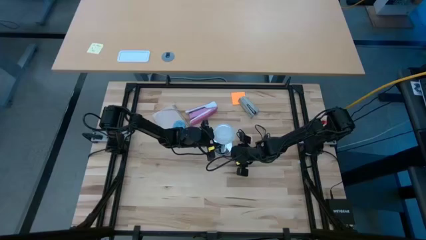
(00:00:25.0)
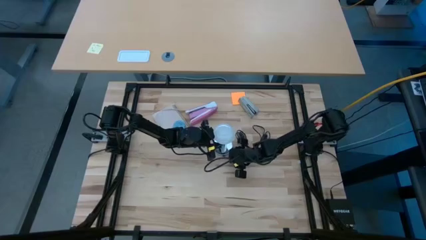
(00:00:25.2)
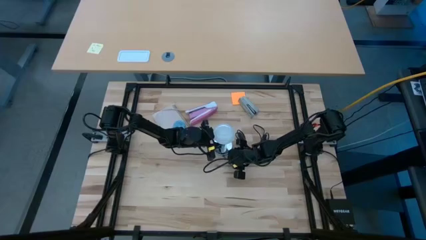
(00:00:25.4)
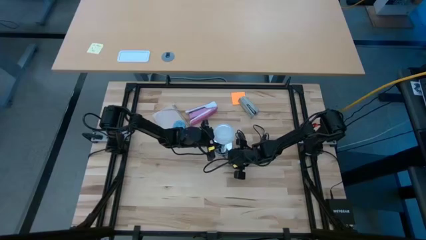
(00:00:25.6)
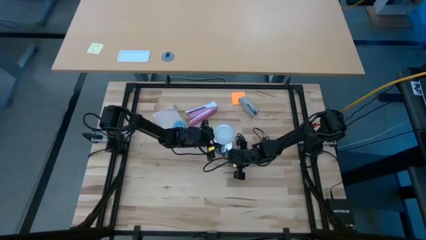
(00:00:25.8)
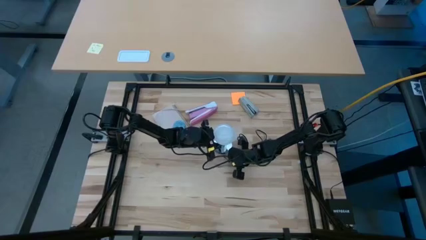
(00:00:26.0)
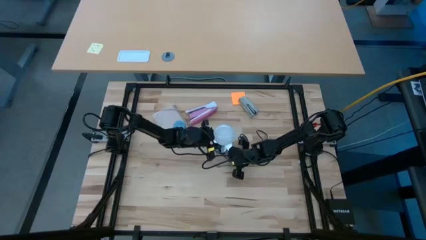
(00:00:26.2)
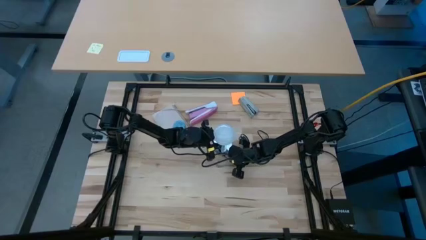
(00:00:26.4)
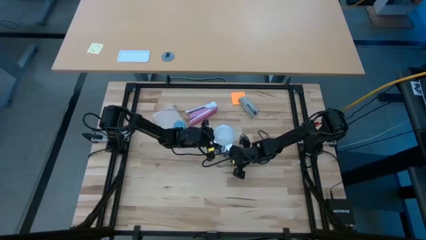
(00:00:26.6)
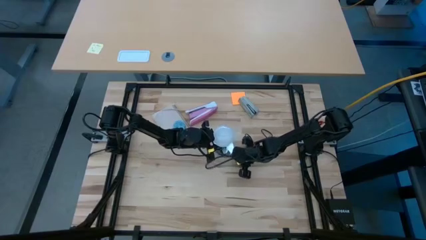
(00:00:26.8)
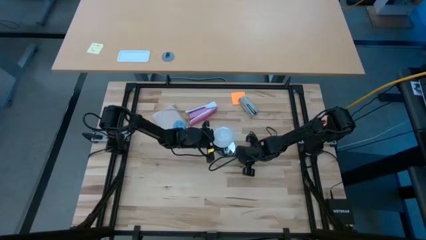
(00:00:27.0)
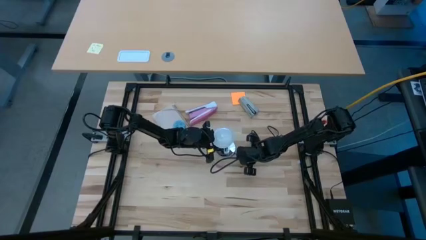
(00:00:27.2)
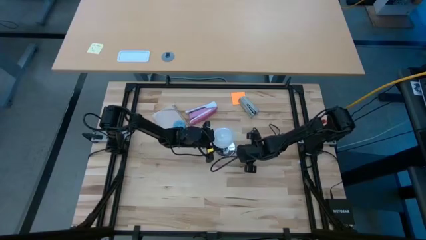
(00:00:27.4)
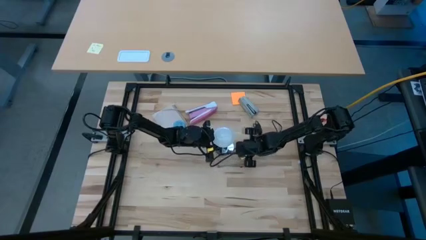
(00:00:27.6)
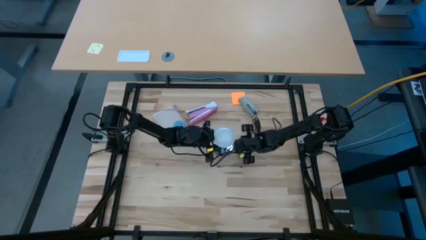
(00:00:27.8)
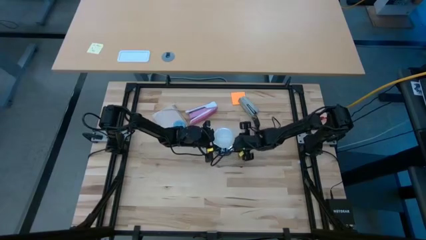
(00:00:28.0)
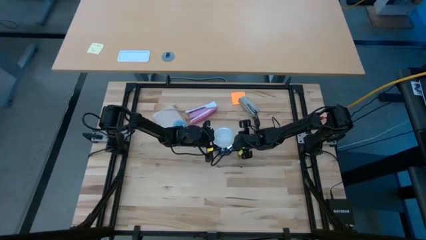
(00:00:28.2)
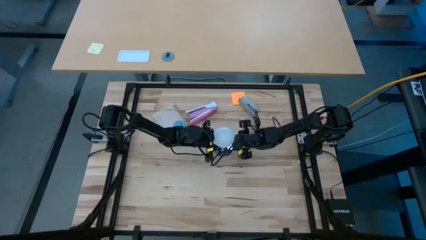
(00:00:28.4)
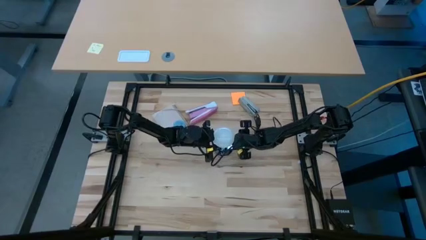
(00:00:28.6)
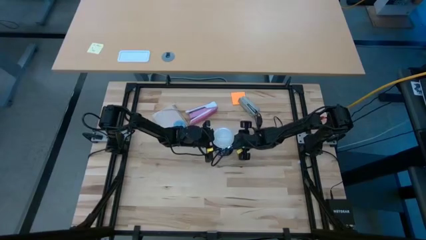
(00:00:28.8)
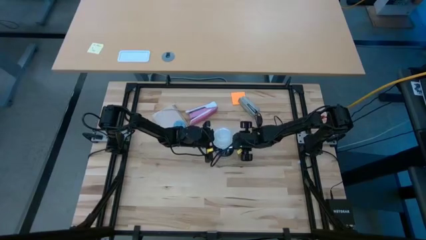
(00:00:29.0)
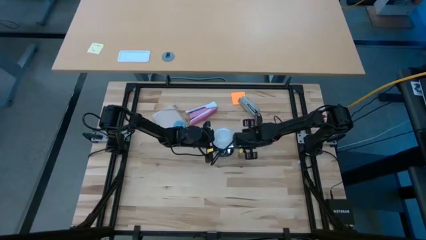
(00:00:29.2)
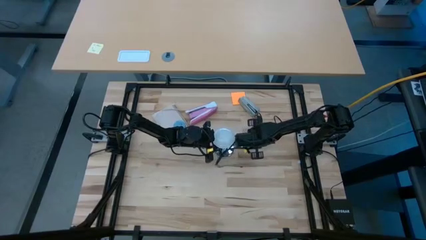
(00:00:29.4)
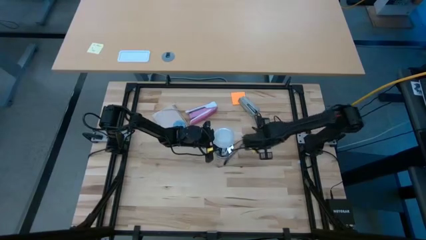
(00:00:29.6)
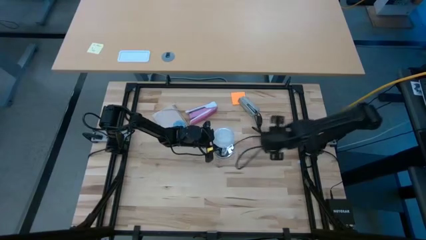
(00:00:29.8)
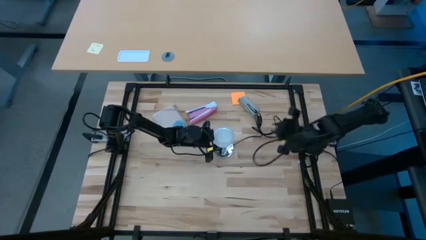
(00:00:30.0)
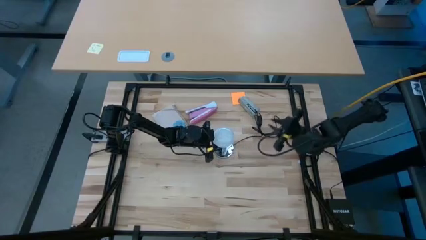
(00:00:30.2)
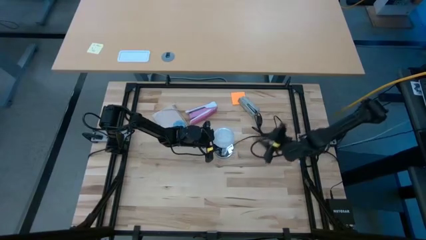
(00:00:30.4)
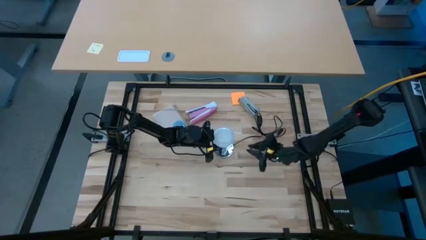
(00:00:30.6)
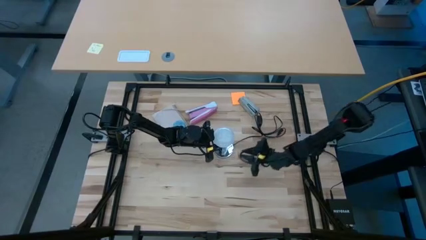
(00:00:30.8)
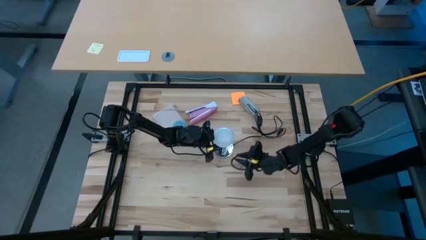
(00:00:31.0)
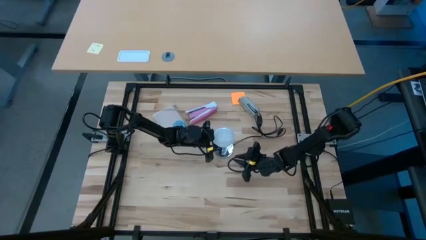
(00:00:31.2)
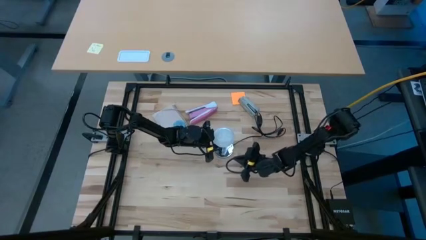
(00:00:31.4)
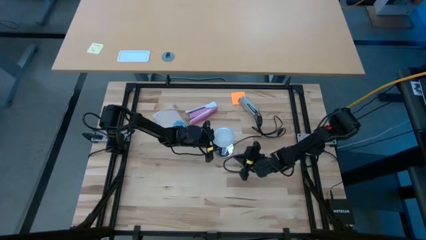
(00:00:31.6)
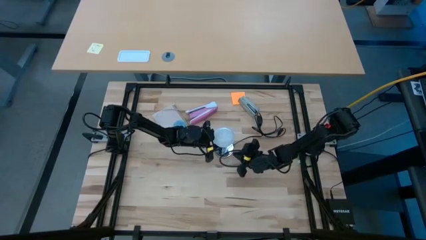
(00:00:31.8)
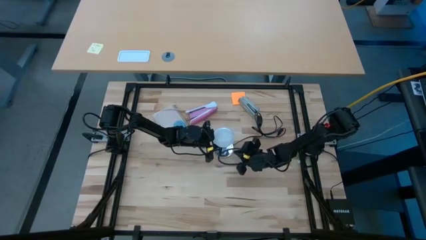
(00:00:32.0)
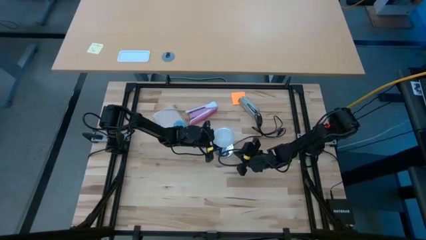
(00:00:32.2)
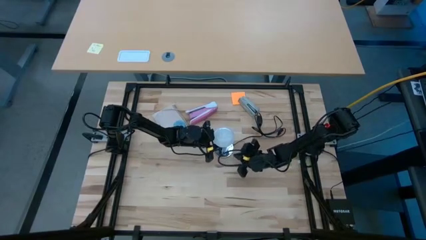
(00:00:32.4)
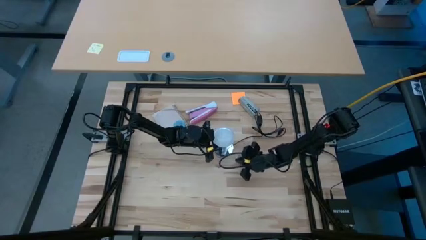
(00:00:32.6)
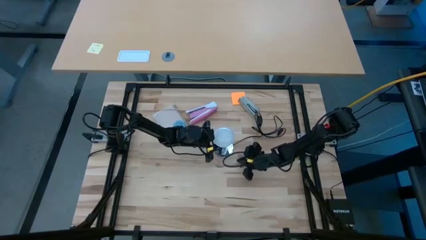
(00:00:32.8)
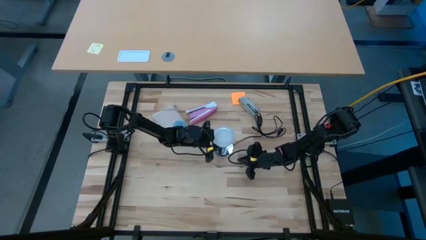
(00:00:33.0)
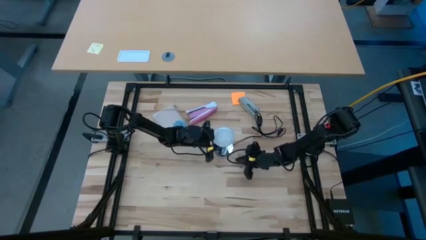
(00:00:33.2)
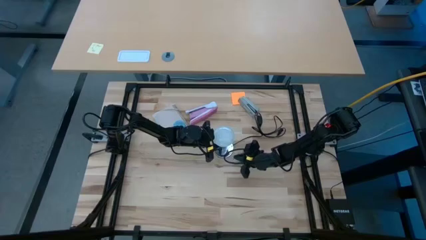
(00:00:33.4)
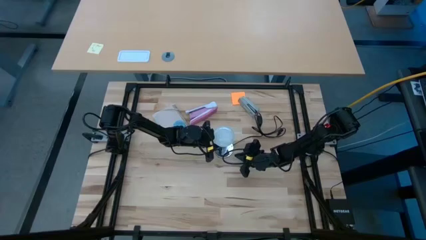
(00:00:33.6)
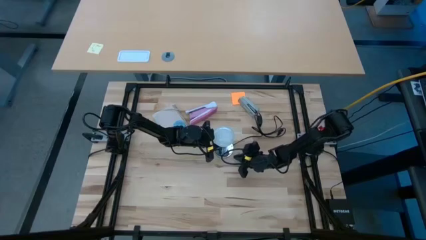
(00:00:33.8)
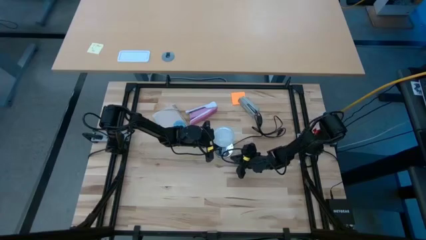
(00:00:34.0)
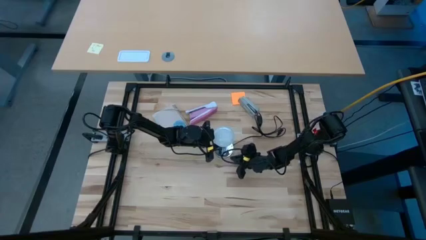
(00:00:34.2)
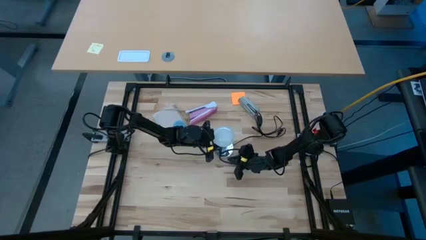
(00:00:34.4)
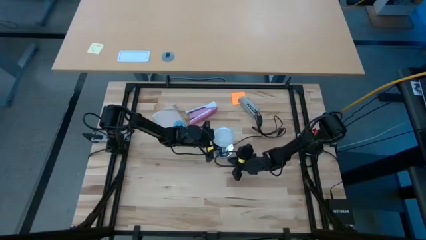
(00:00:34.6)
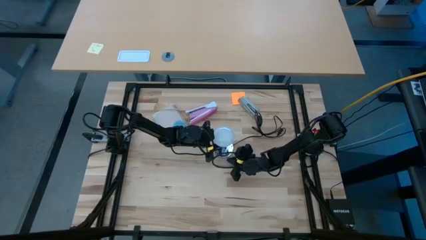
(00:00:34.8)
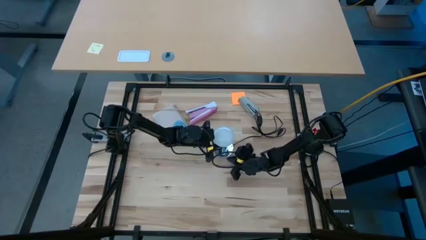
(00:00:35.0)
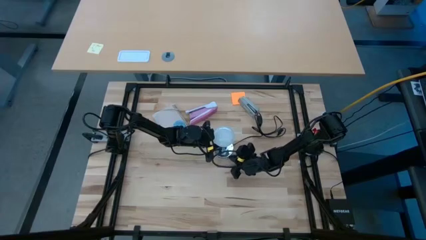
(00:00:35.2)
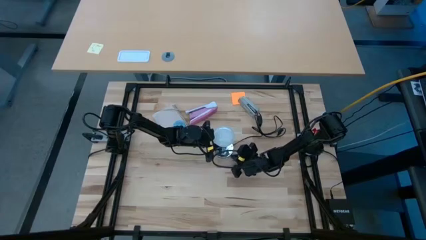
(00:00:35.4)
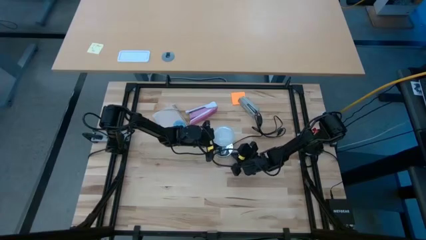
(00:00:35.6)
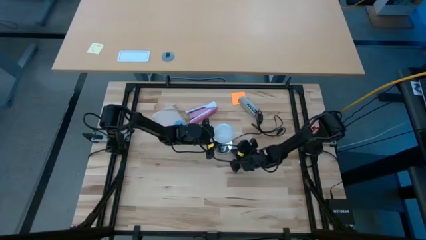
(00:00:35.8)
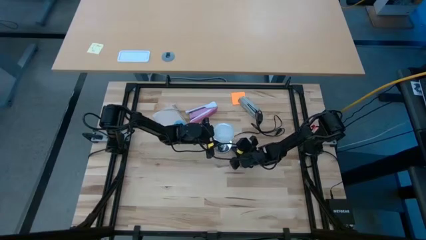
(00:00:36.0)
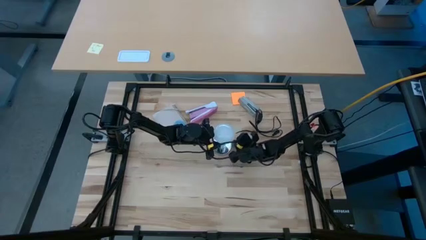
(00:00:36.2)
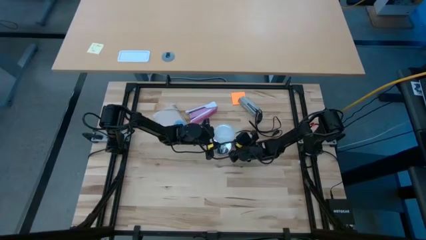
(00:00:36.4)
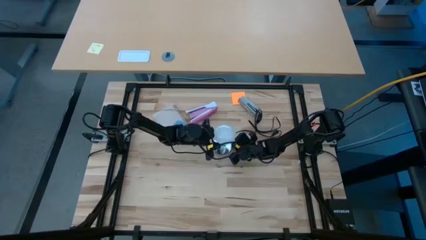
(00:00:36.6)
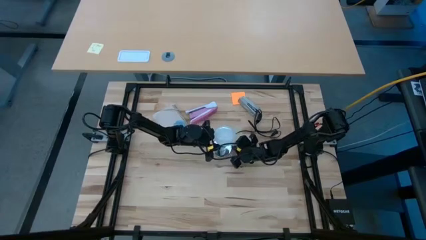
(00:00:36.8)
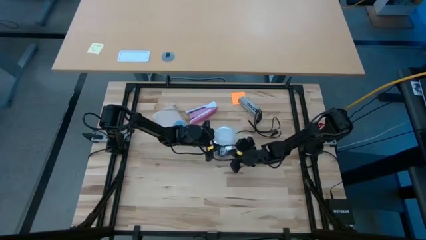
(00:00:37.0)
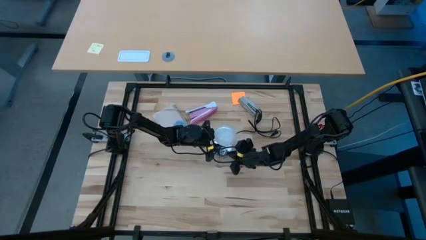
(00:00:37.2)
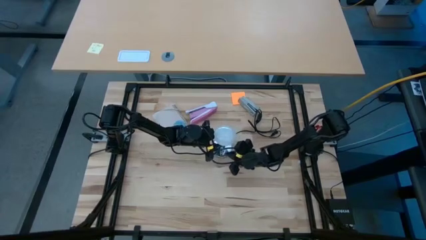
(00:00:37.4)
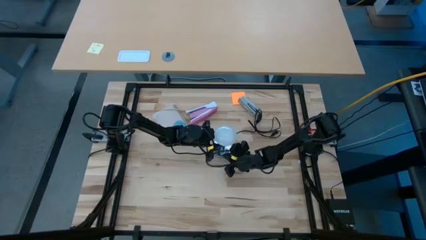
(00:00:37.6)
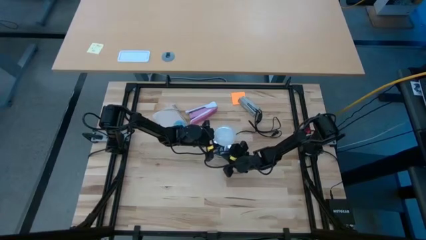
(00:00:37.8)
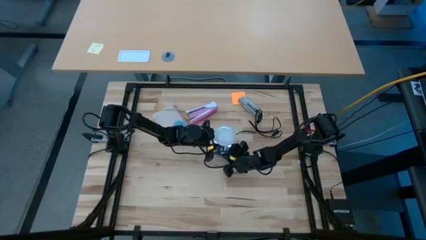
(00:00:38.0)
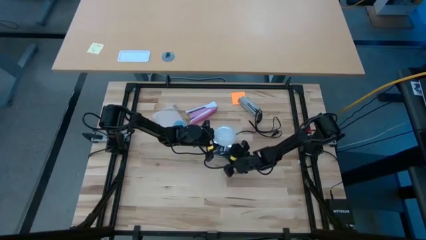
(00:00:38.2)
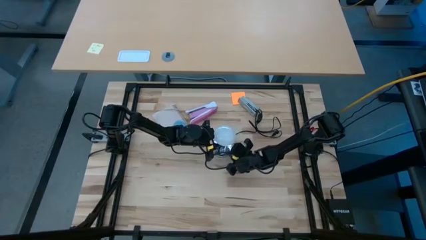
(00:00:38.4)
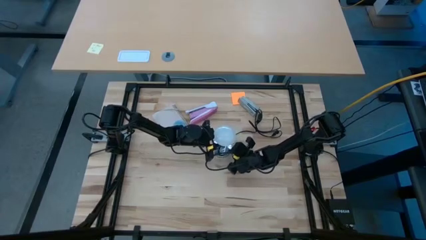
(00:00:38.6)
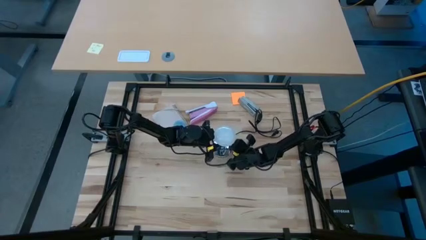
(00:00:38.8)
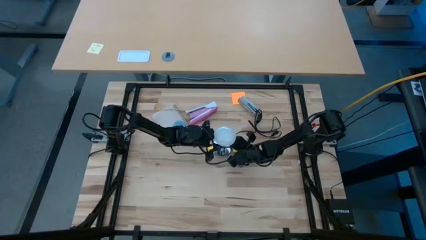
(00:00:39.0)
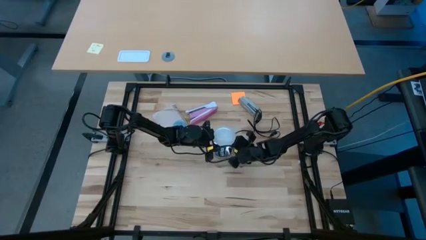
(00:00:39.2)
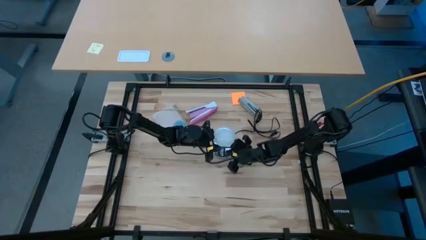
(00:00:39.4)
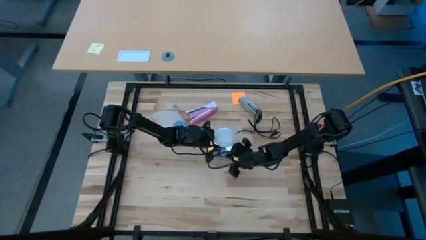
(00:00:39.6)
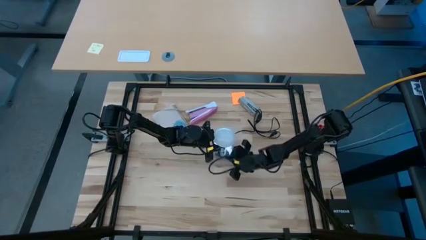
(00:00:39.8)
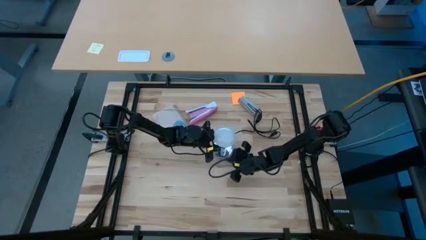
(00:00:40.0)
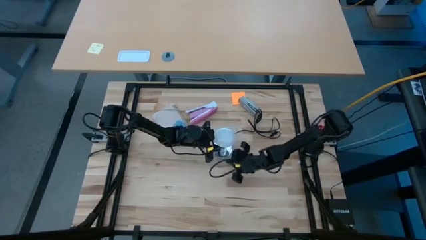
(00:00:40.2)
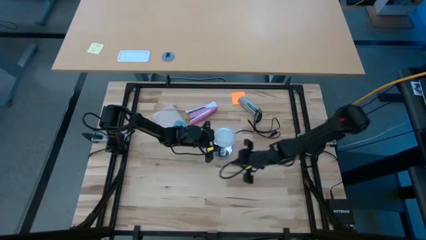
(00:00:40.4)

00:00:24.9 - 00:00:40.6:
Task: Screw lightbulb
Insert the white lightbulb into the silver desk lamp
